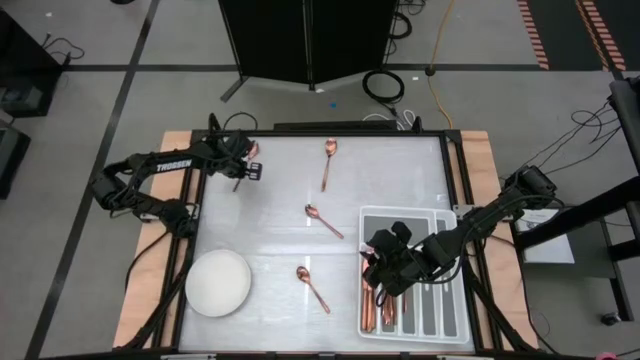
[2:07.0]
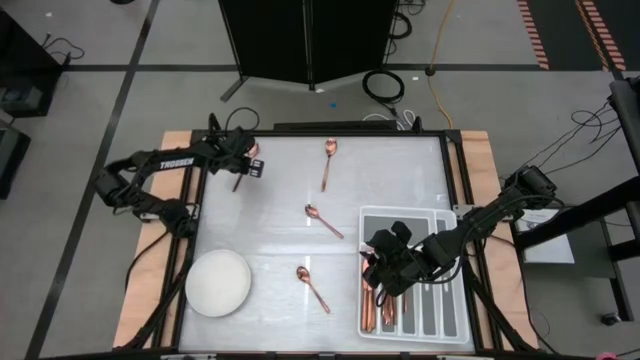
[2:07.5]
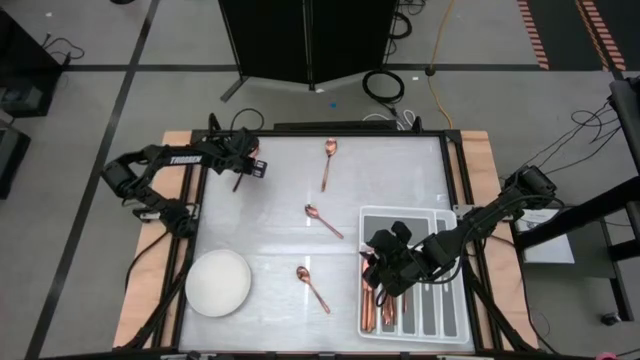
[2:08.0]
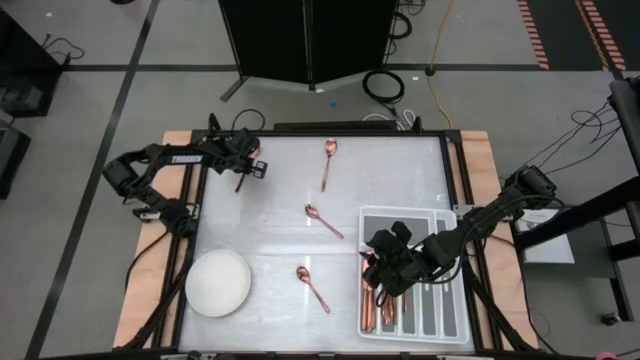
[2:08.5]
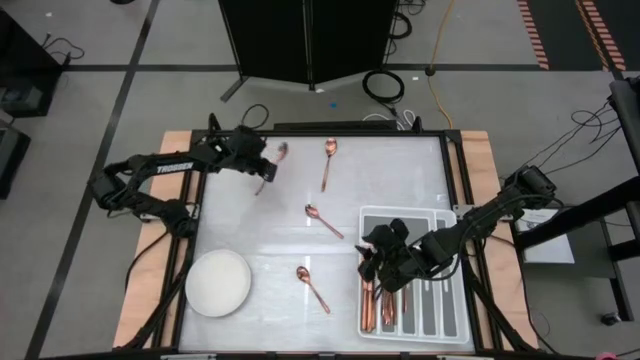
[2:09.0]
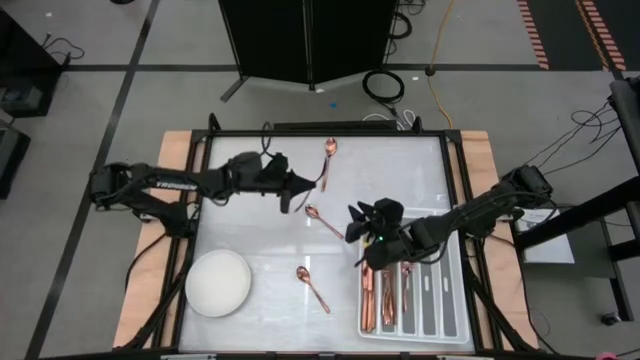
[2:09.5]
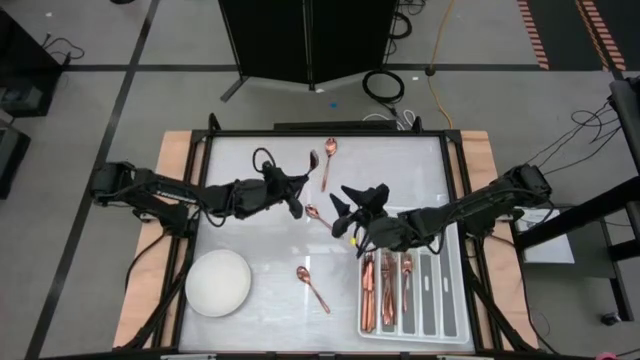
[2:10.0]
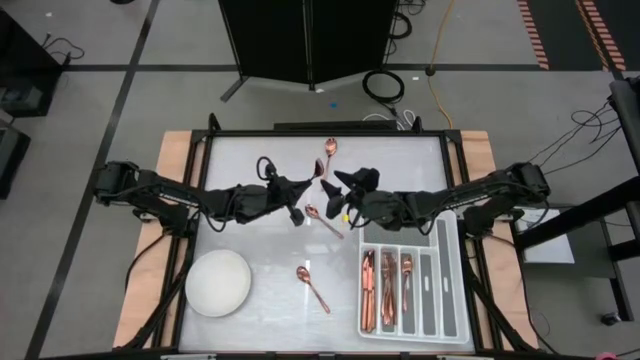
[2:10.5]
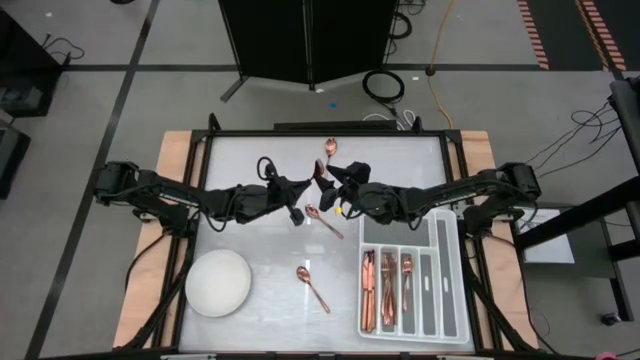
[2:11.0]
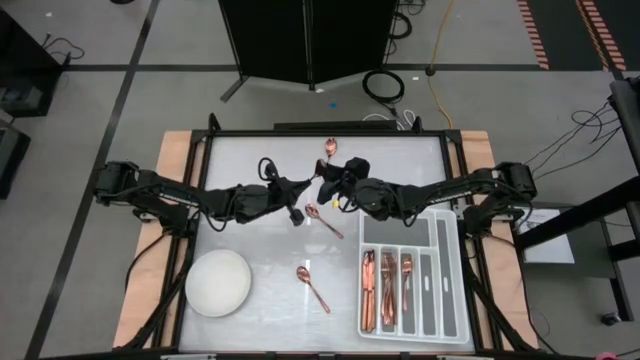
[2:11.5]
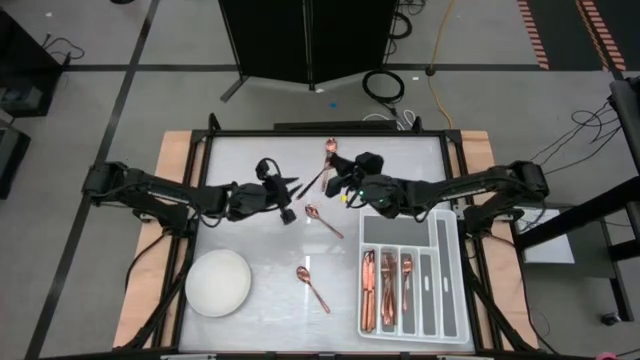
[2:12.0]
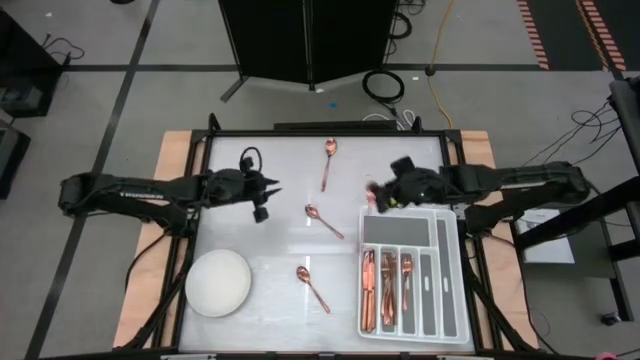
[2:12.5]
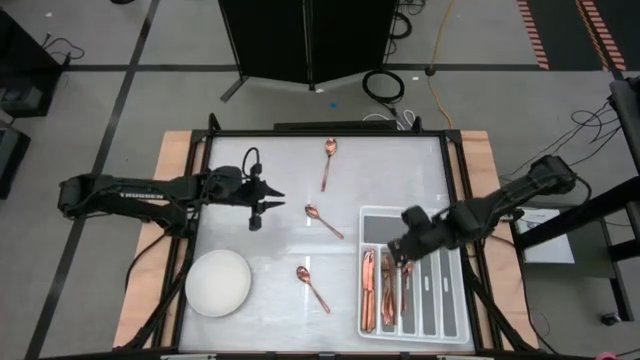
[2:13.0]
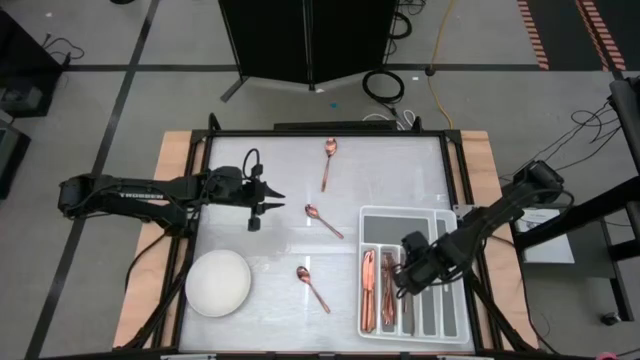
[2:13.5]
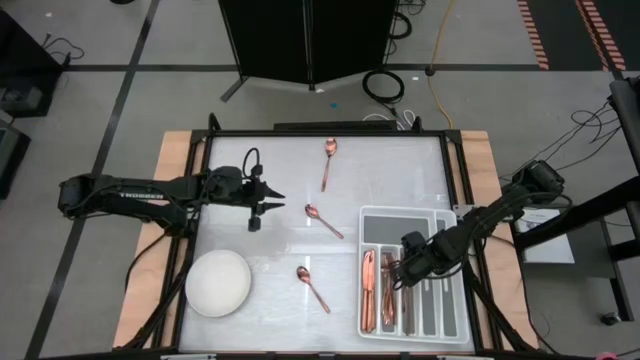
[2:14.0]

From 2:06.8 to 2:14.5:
Task: Sort silverware
Put the brown spoon in the white silverware organizer

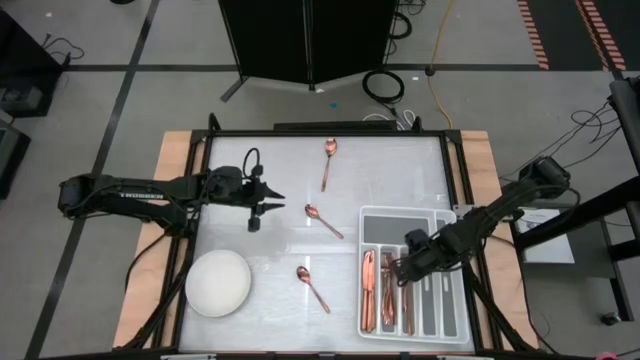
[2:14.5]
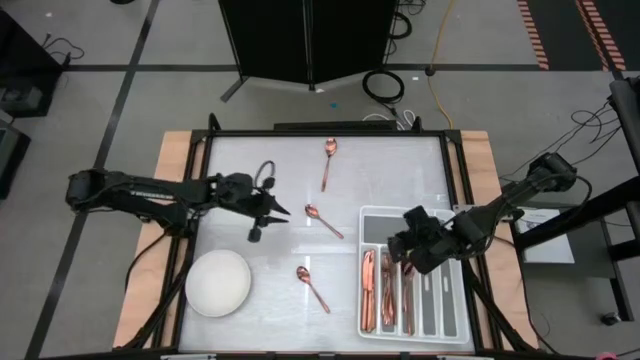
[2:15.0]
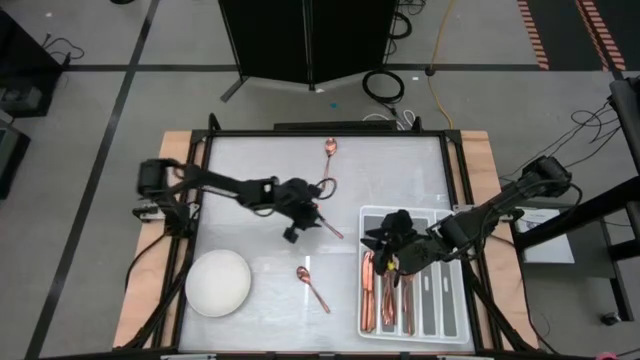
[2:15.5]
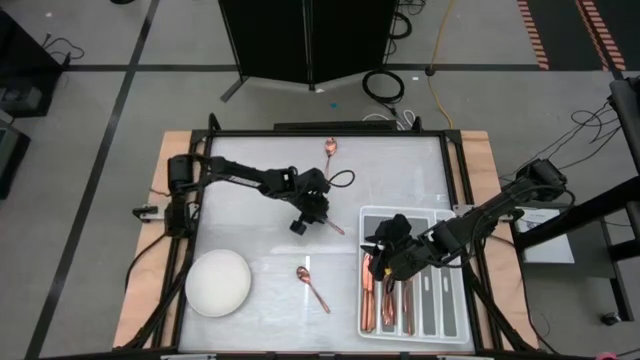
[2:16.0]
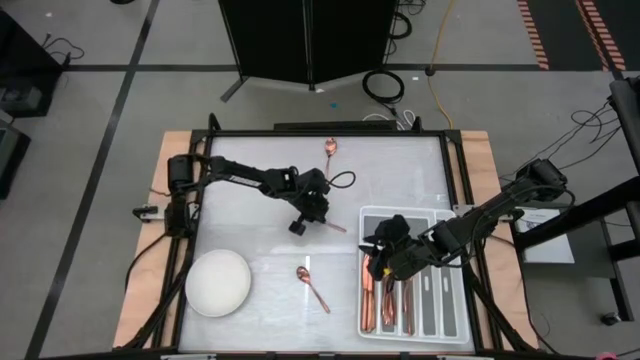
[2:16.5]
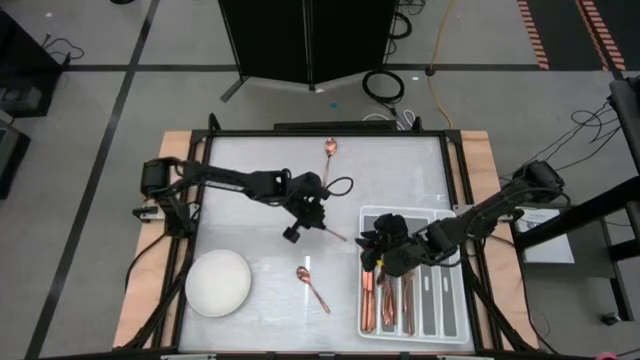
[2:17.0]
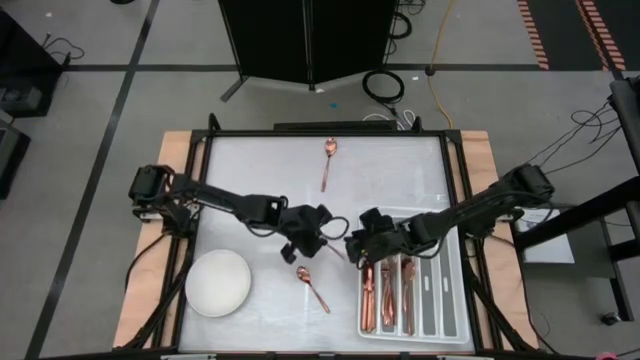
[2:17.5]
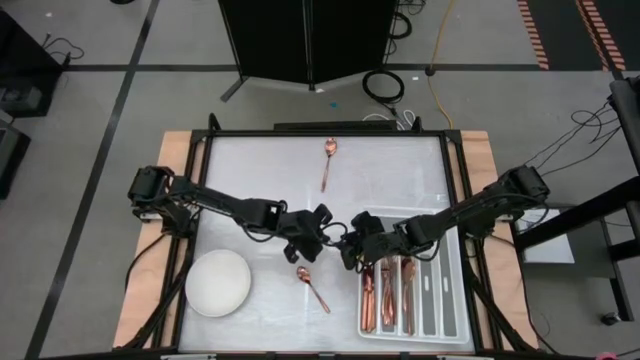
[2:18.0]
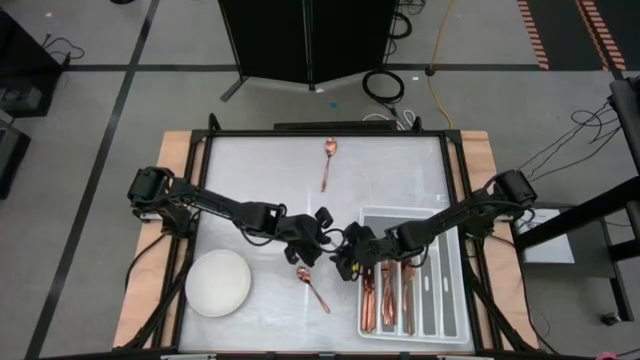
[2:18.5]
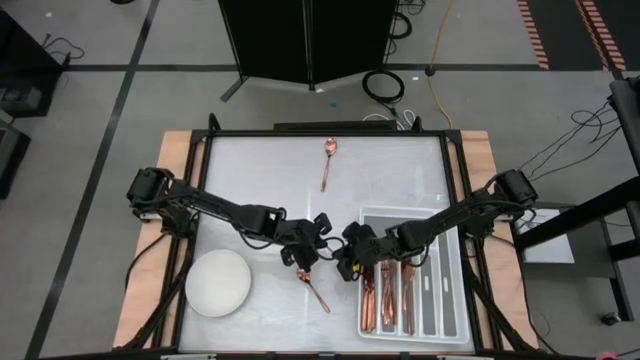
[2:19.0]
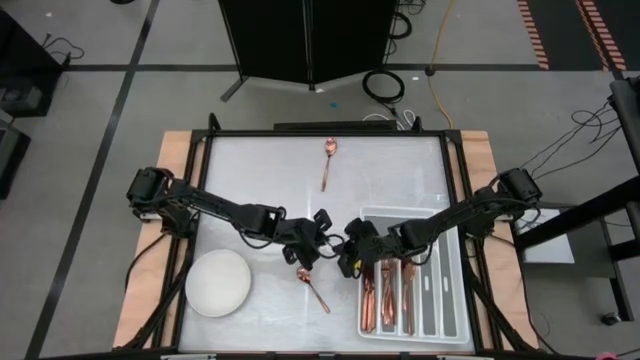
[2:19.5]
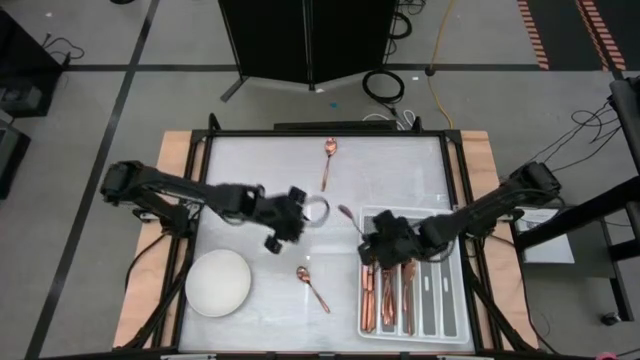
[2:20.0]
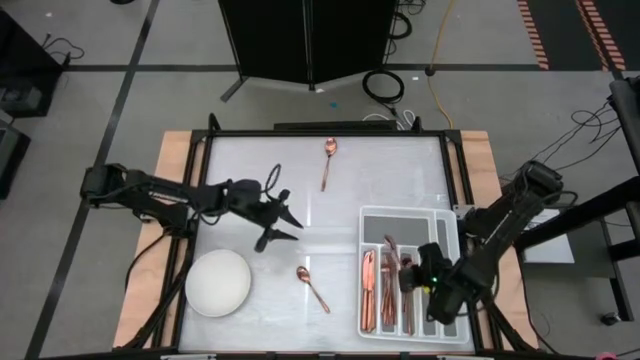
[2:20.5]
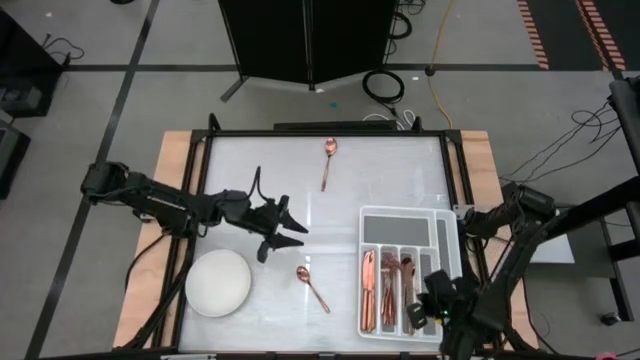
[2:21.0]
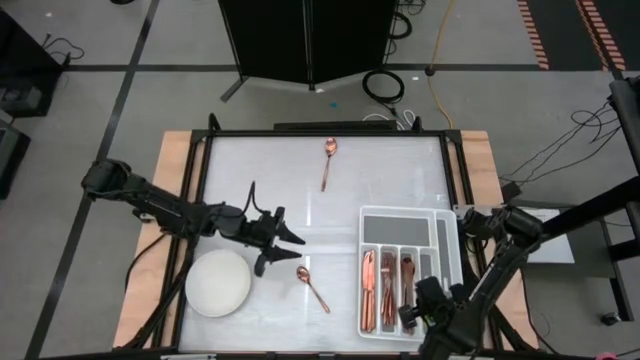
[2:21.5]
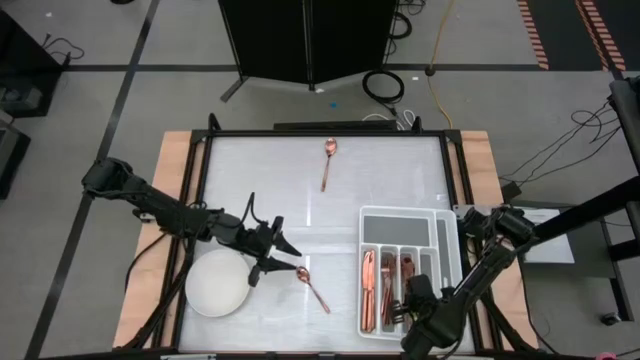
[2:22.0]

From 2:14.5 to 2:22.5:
Put the middle brown spoon in the white silverware organizer

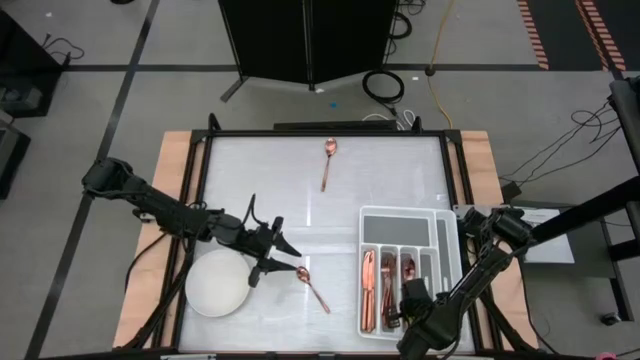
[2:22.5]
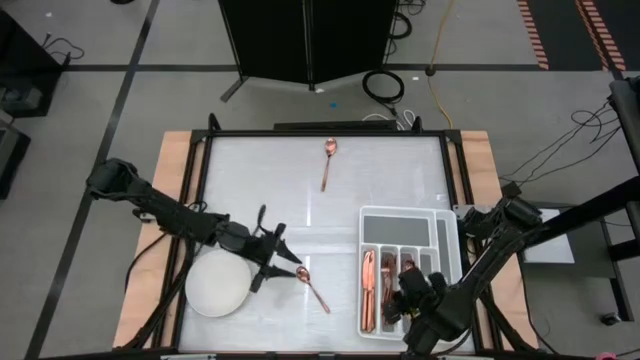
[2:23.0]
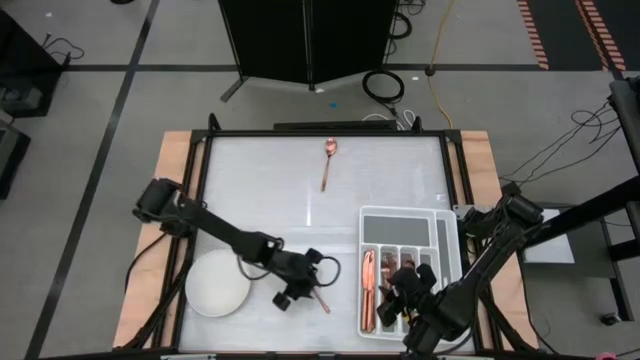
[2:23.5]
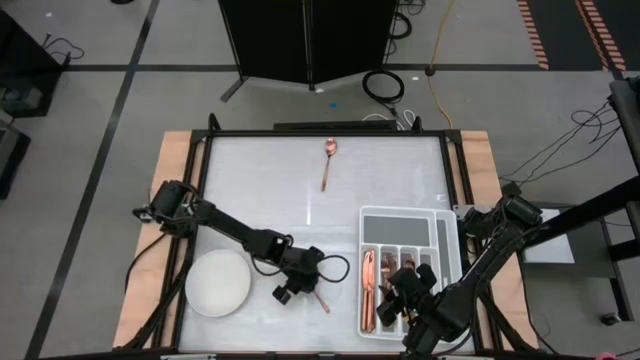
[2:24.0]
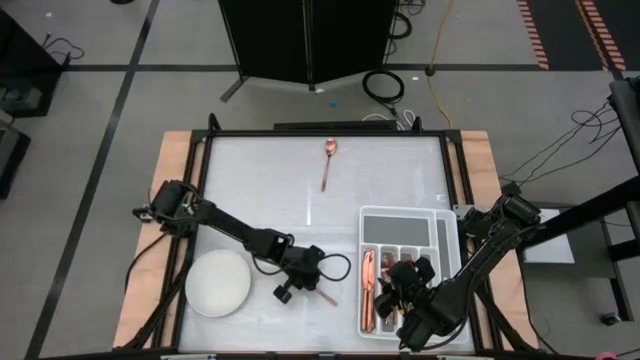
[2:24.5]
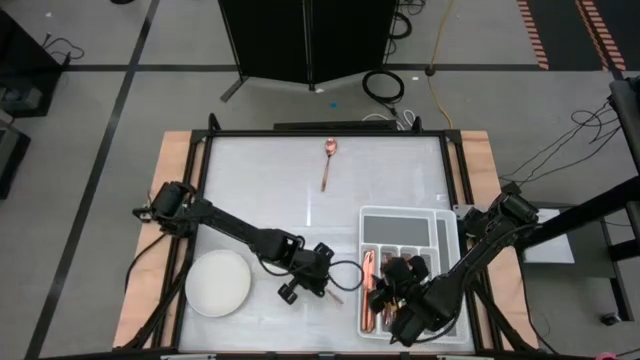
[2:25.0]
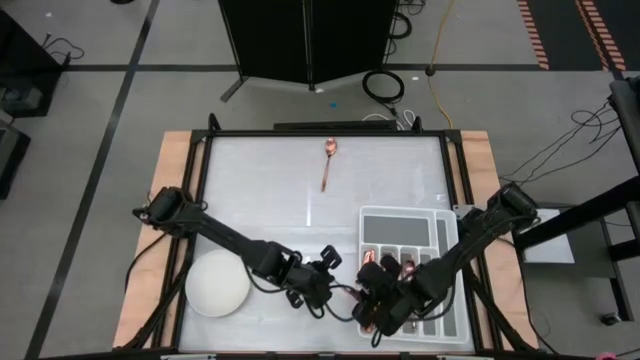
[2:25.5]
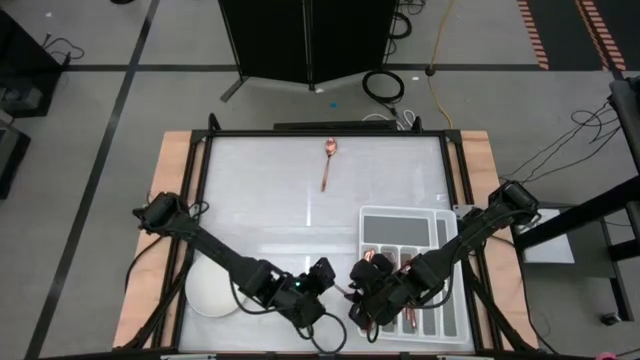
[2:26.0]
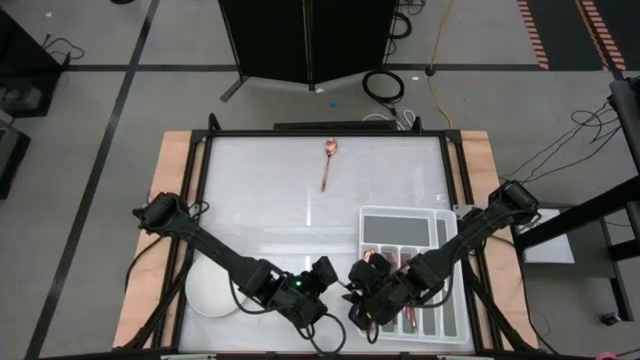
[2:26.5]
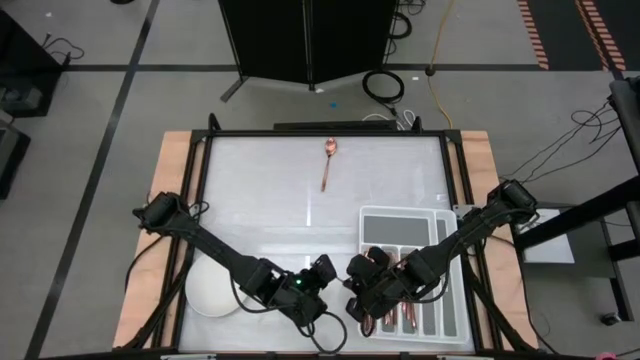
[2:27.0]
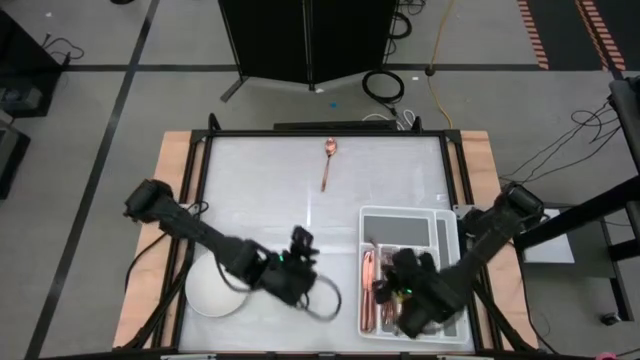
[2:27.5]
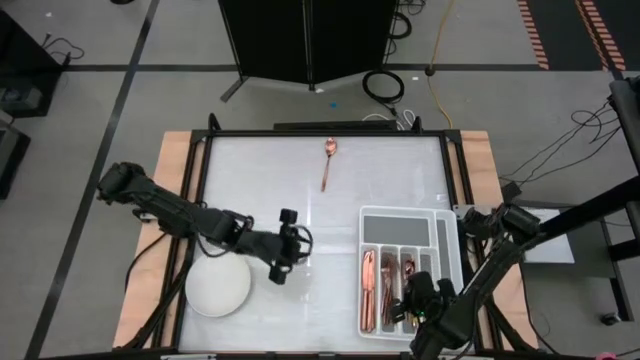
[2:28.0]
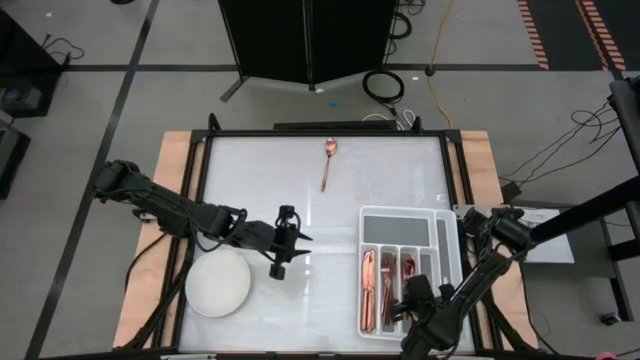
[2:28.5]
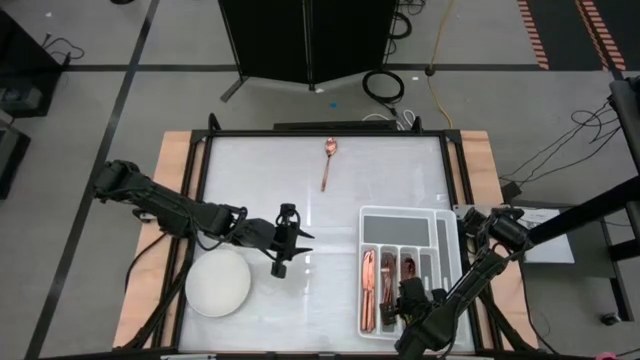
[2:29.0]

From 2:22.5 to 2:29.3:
Put the bottom brown spoon in the white silverware organizer
